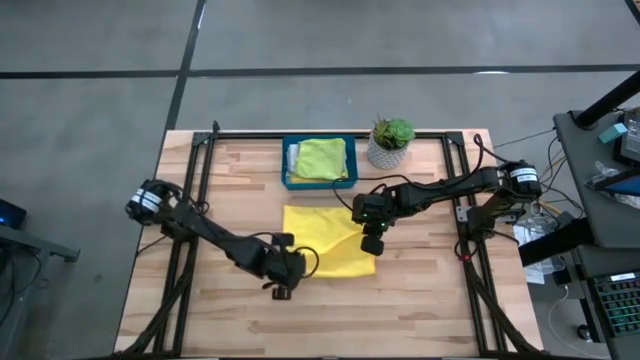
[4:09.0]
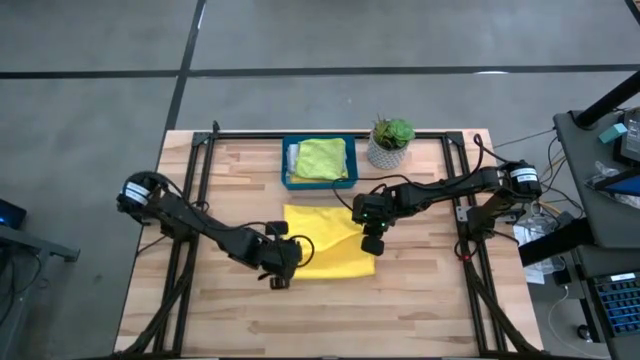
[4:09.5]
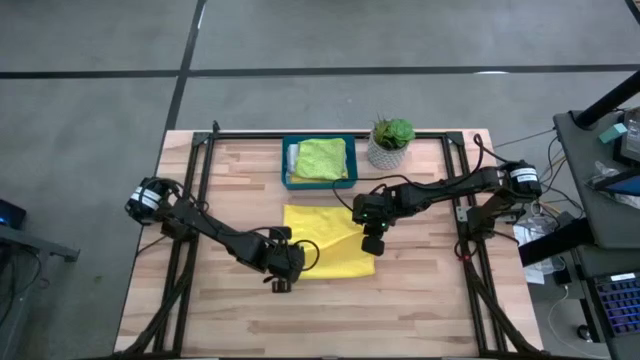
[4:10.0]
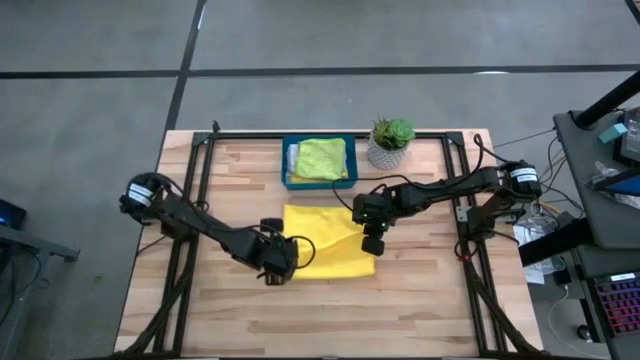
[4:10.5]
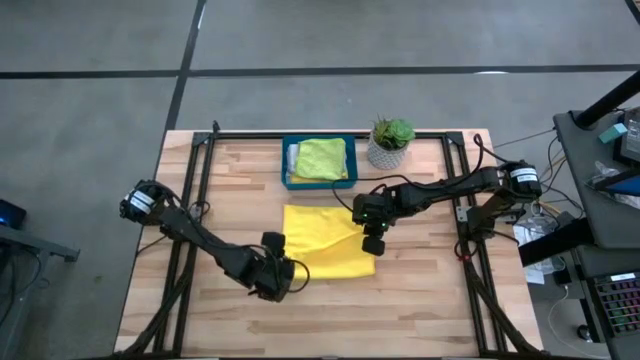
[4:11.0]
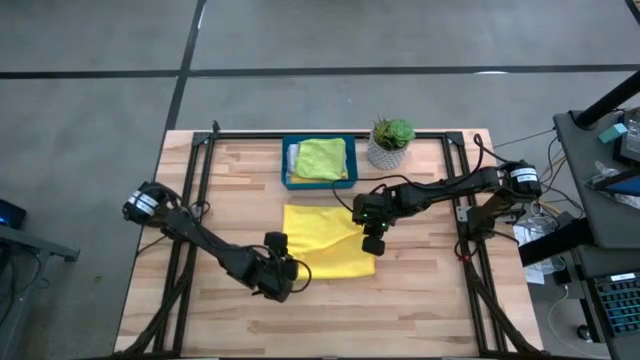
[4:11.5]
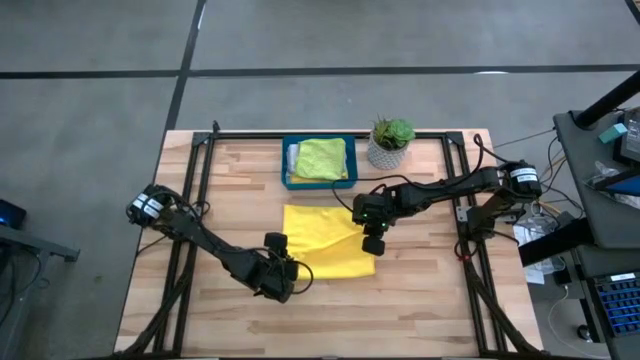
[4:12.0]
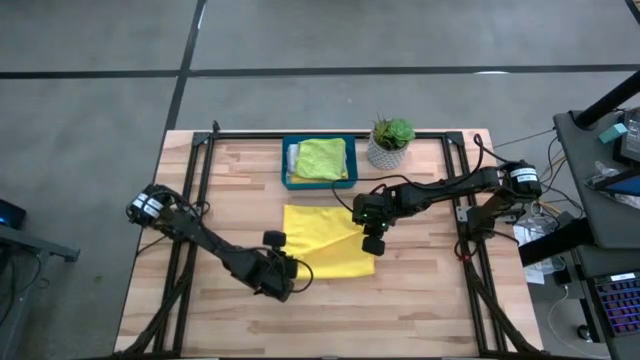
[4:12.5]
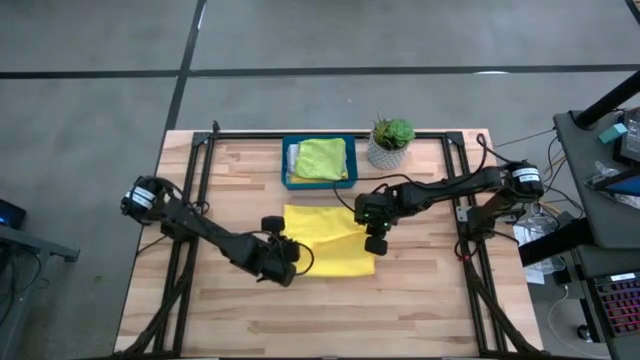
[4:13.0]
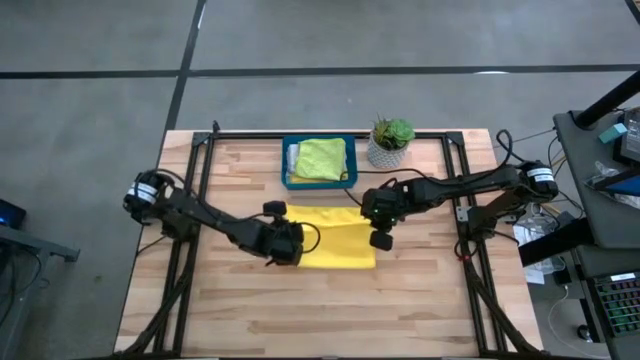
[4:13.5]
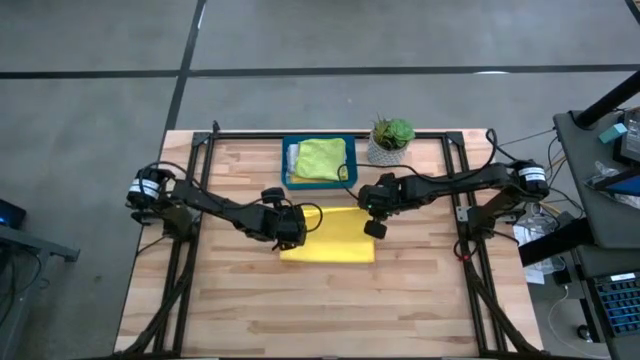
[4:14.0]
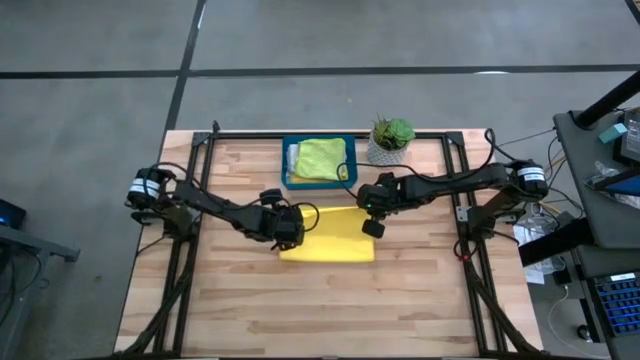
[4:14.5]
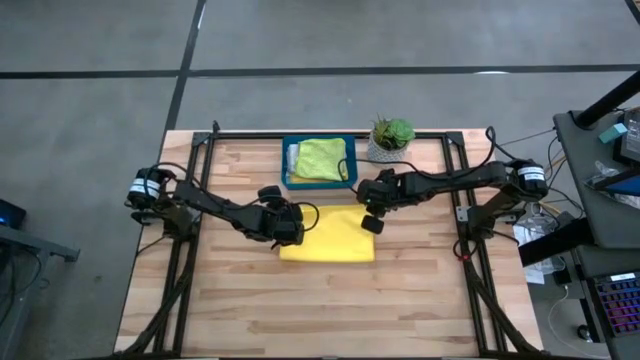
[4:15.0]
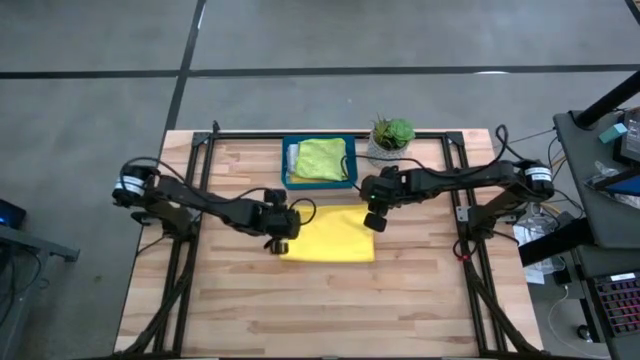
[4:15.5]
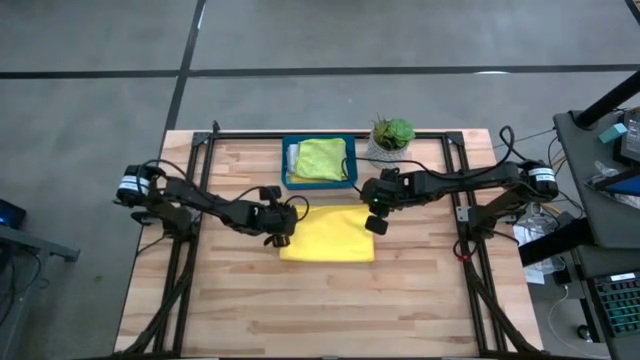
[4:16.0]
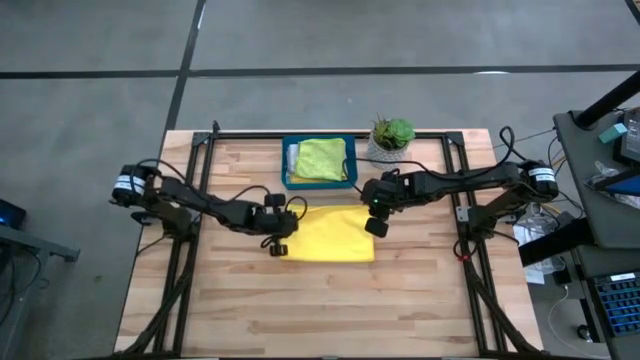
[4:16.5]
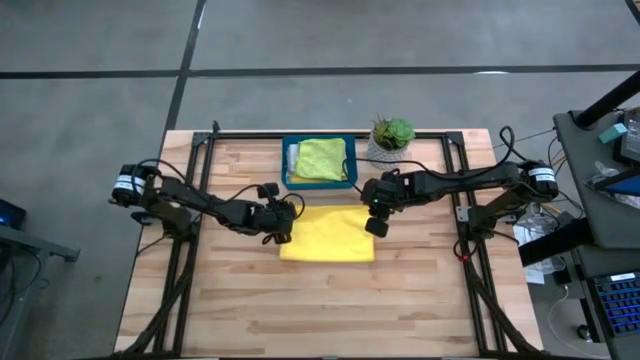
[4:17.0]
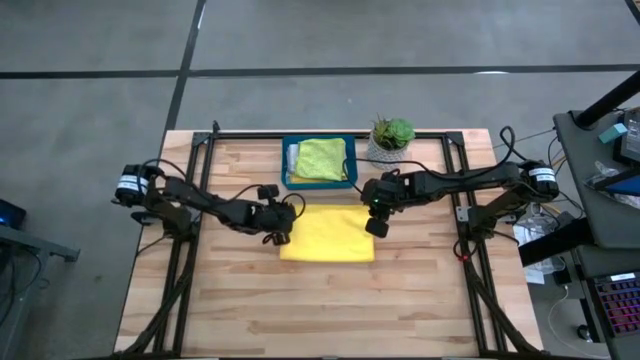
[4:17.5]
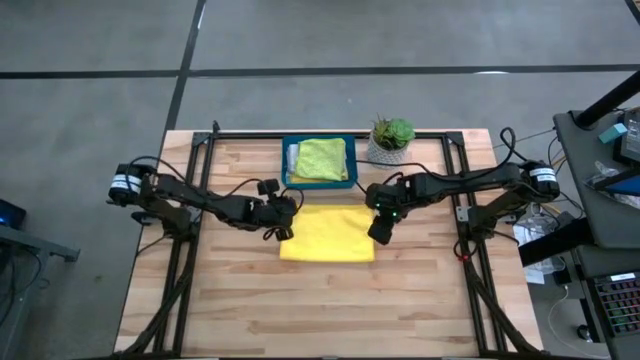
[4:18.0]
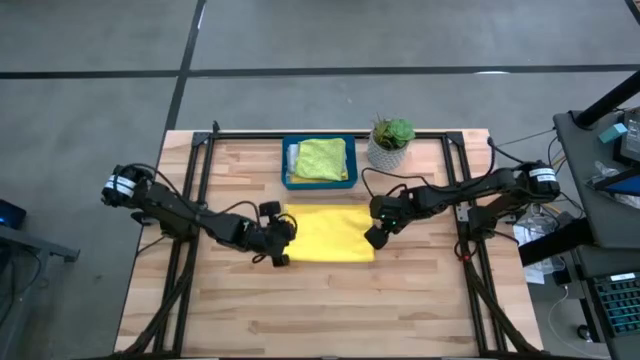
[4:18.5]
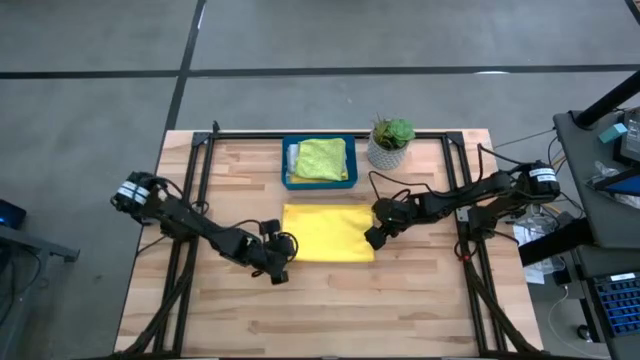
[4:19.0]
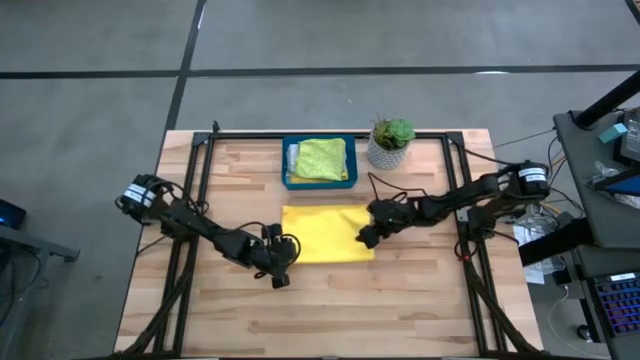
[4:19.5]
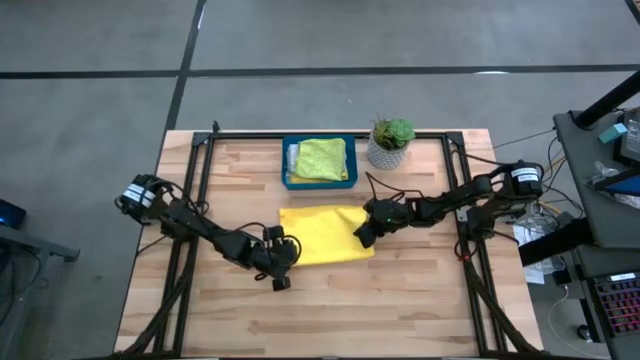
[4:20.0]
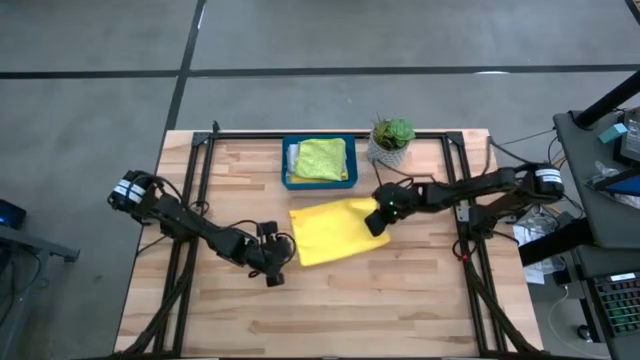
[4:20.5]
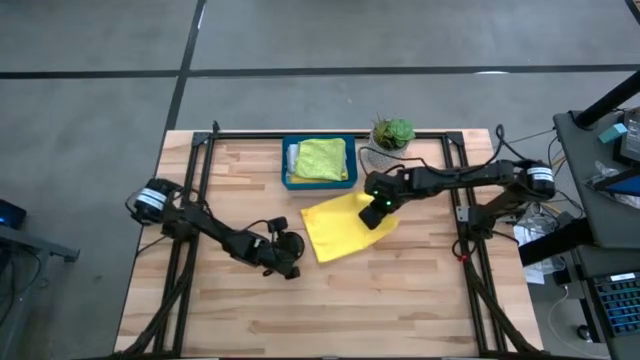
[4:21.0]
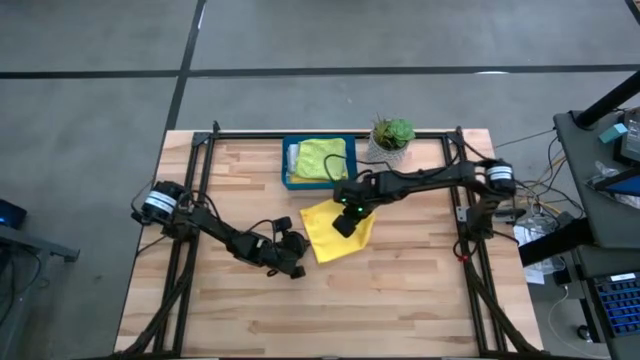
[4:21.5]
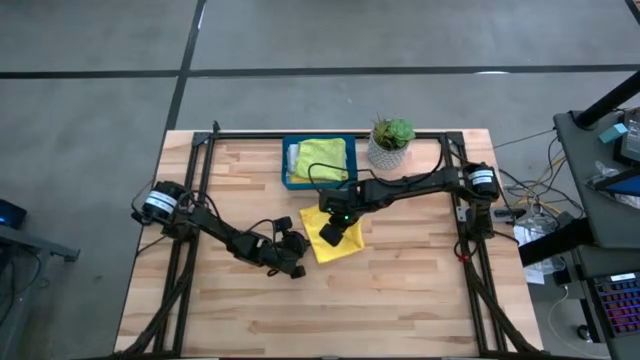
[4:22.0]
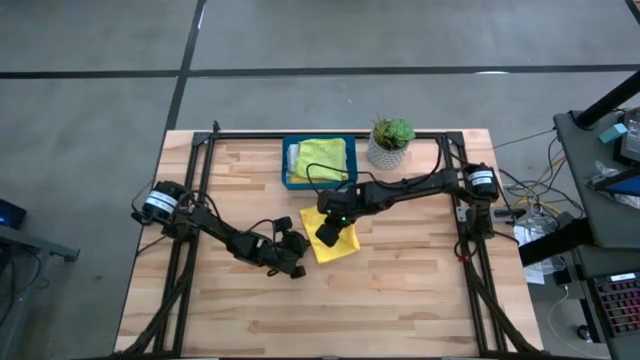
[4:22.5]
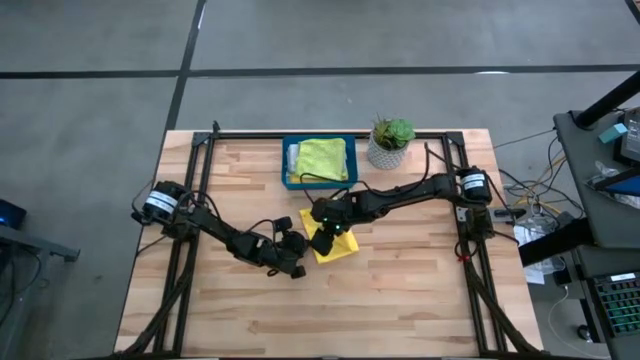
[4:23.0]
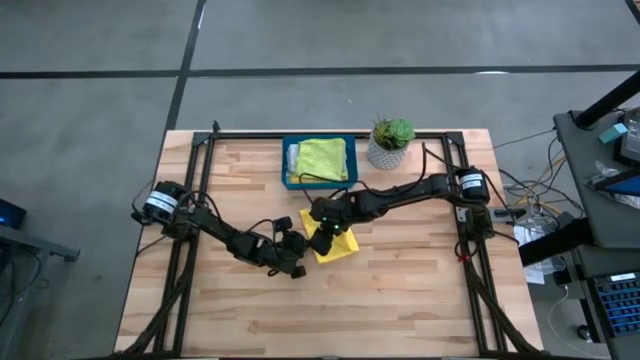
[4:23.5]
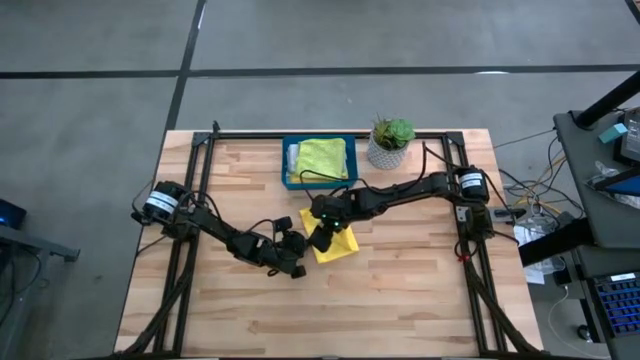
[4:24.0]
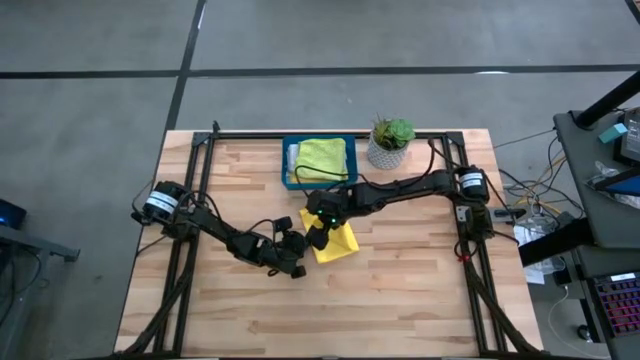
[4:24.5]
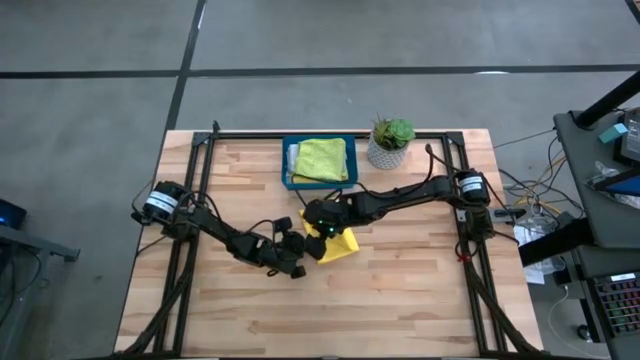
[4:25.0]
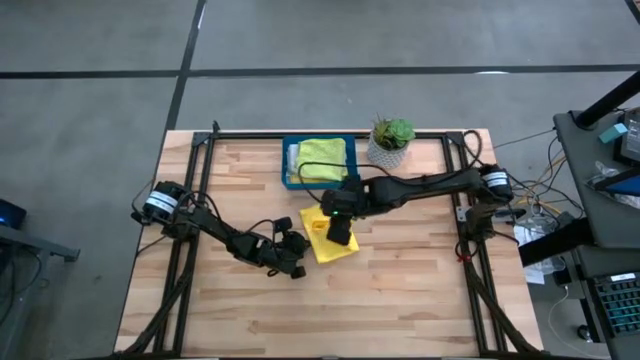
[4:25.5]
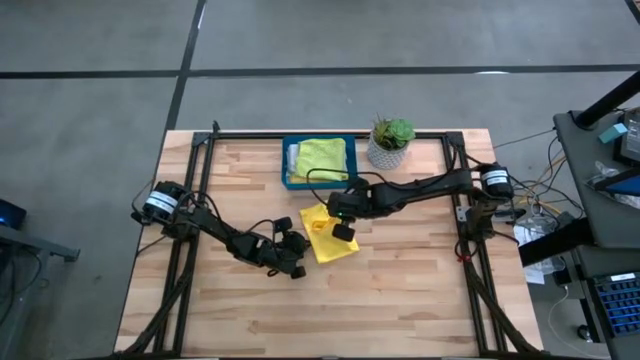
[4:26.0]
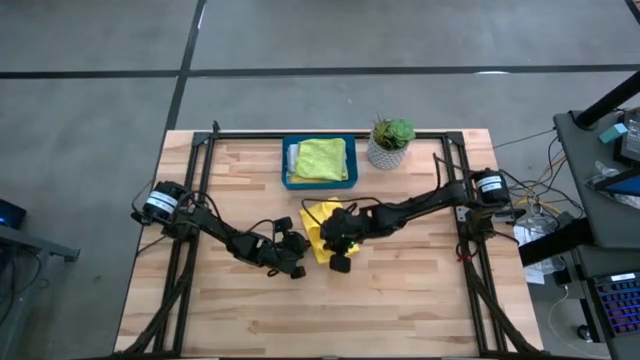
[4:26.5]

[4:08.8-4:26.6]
Task: Fold microfiber towels
Fold the yellow microfiber cloth

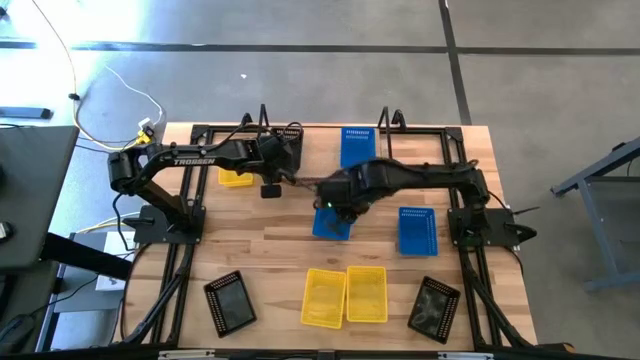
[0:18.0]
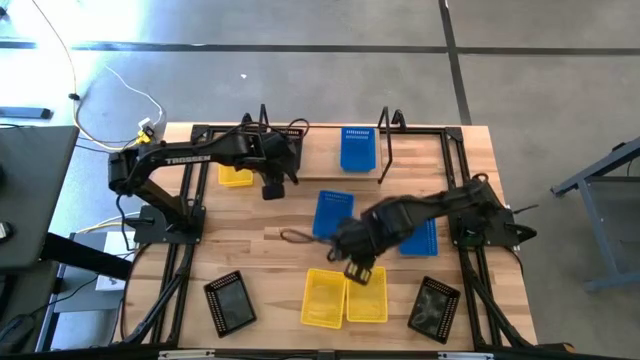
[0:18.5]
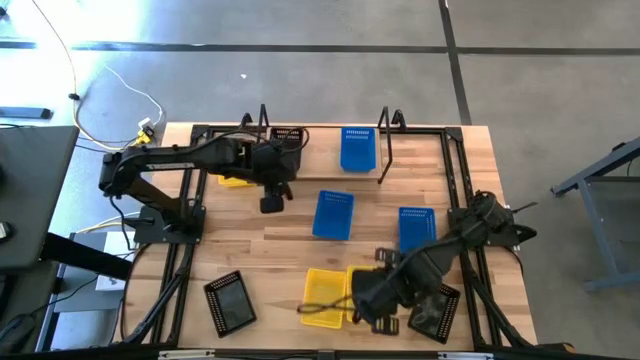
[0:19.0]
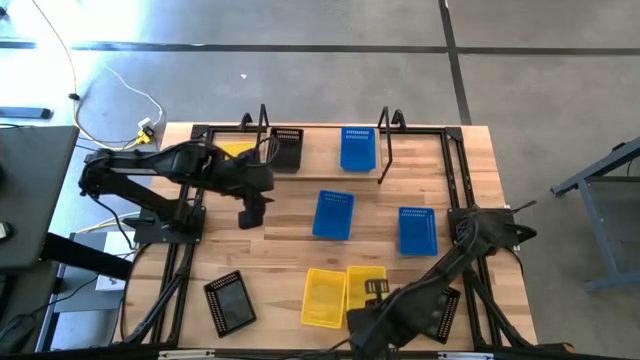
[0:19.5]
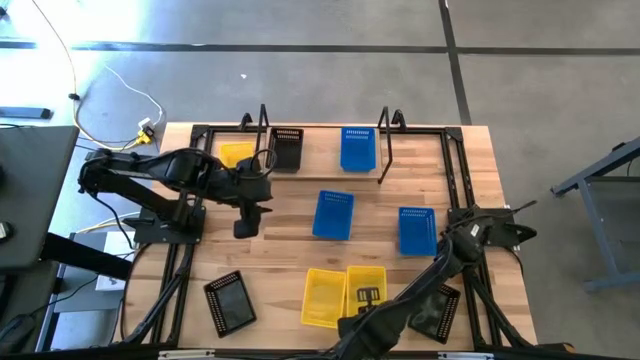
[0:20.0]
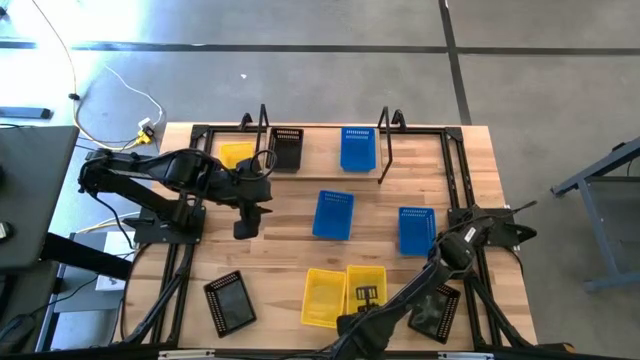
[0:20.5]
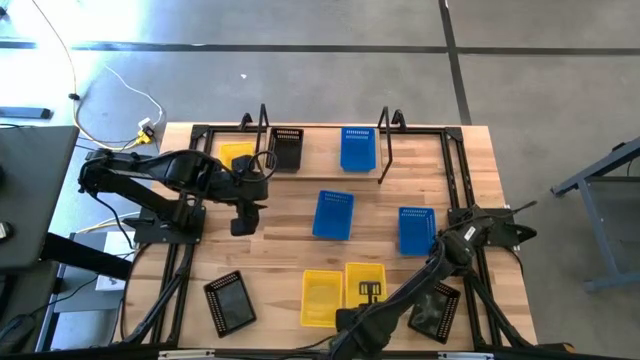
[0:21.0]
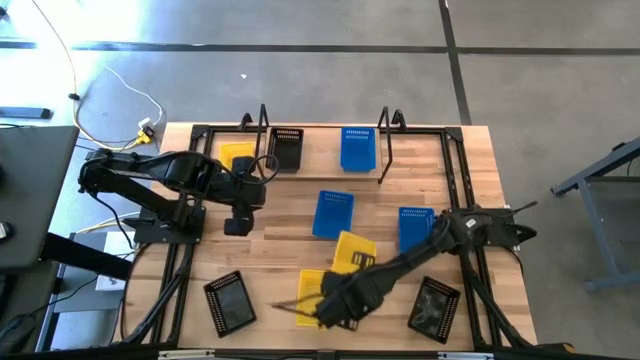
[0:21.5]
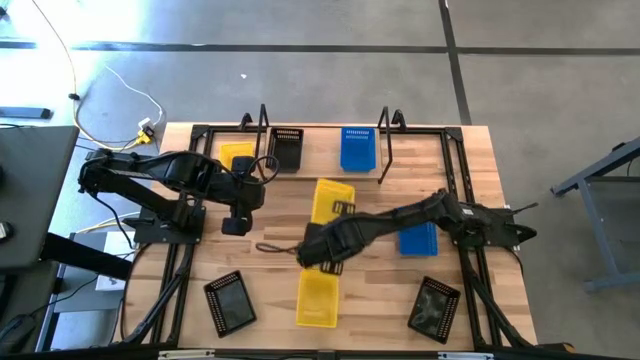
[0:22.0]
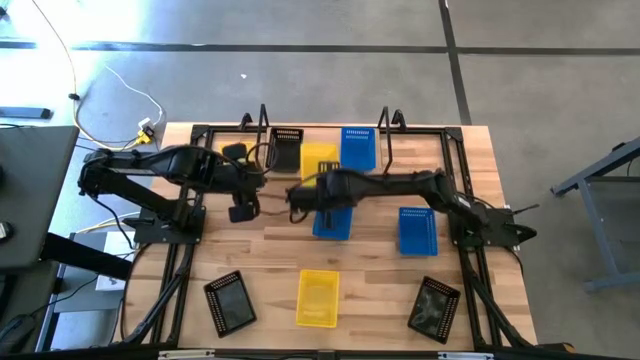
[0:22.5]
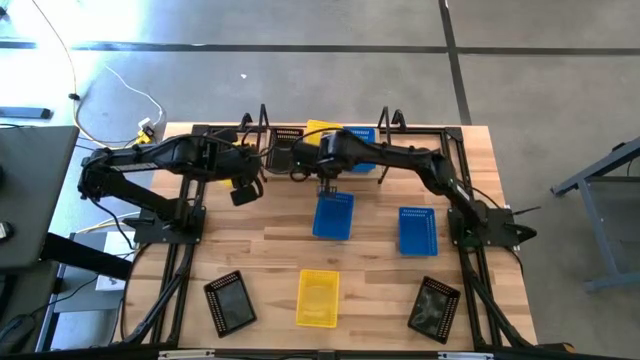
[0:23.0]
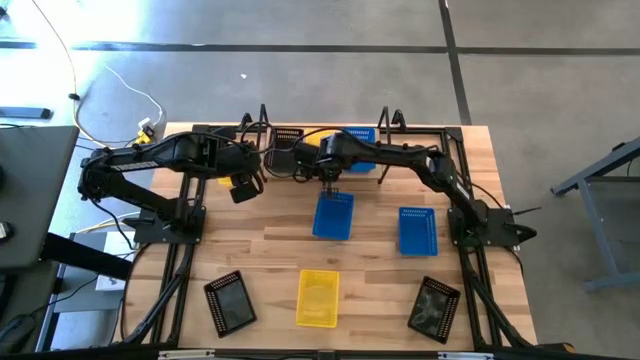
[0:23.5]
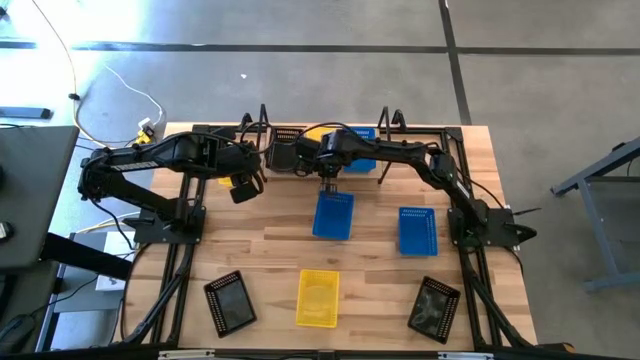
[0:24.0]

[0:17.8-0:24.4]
Task: Stack baskets on shelf by color
Put the bottom right yellow bin on the shelf
